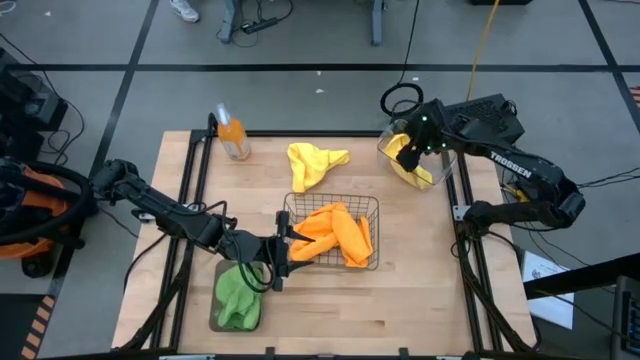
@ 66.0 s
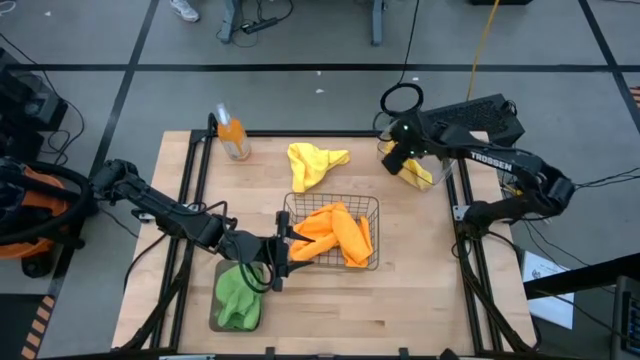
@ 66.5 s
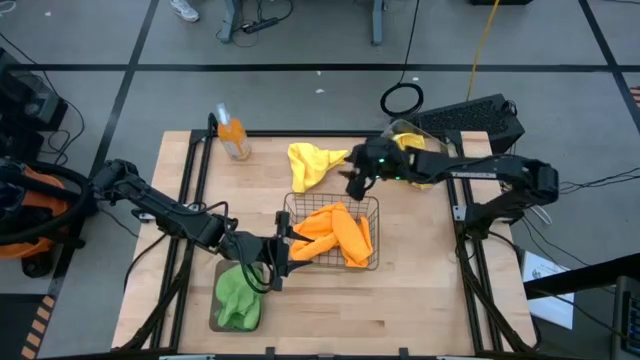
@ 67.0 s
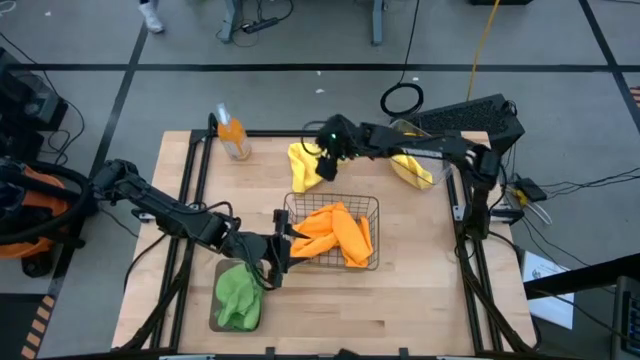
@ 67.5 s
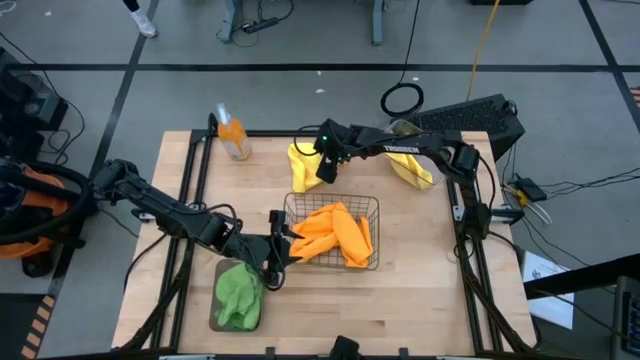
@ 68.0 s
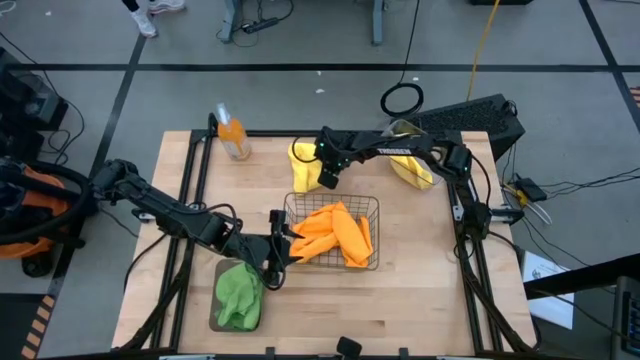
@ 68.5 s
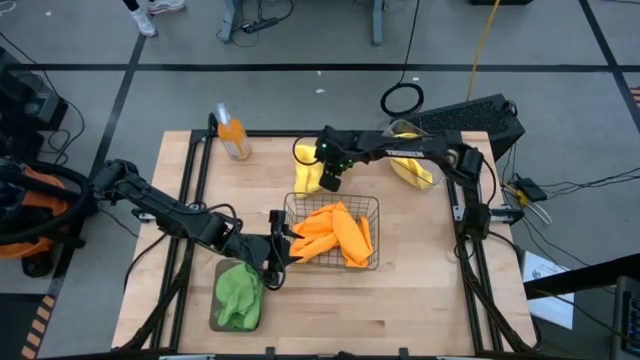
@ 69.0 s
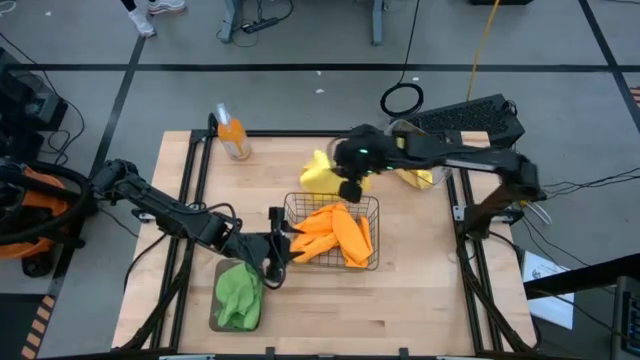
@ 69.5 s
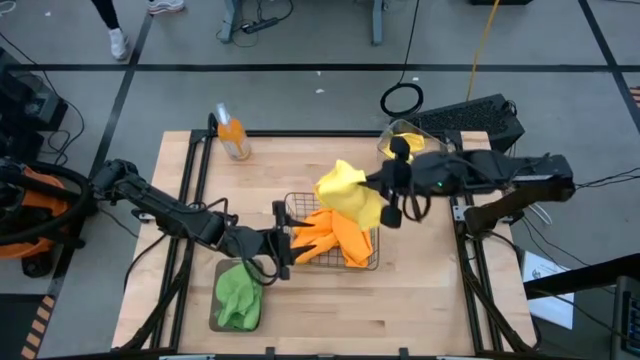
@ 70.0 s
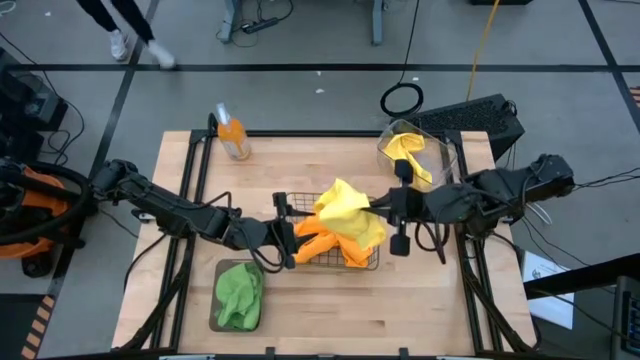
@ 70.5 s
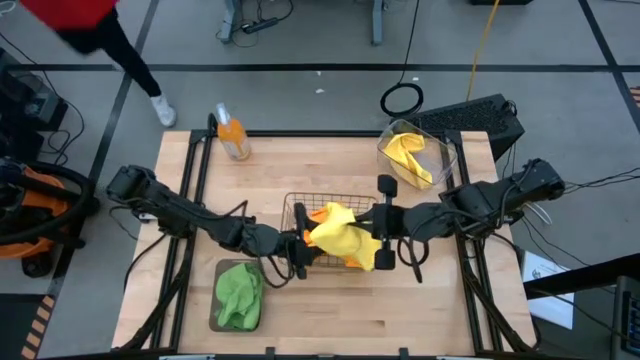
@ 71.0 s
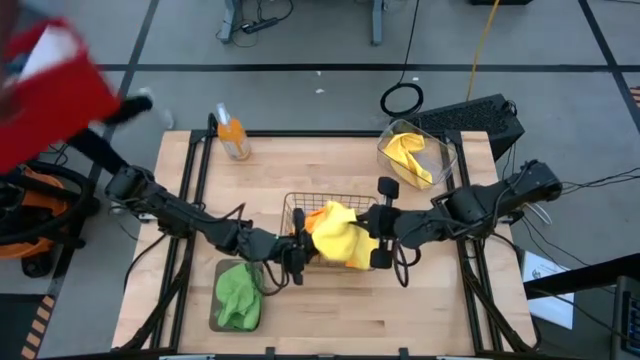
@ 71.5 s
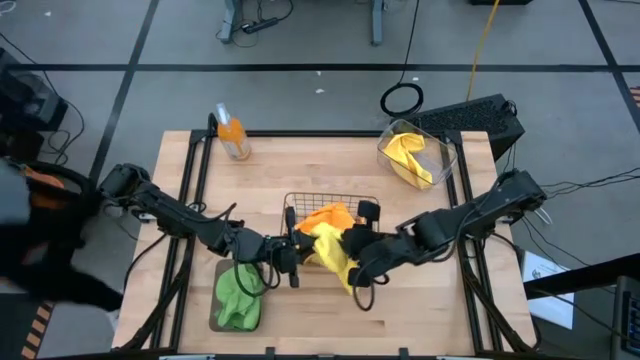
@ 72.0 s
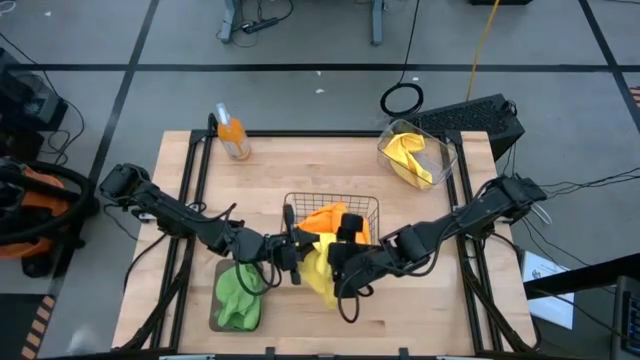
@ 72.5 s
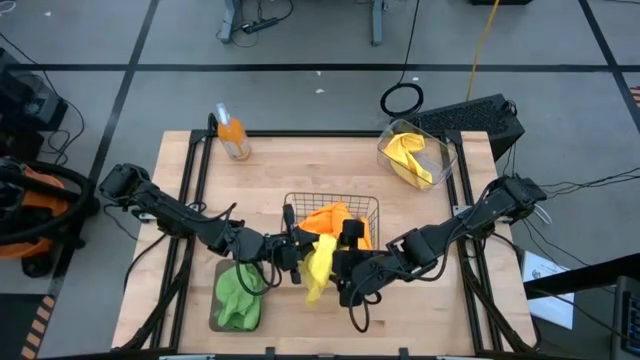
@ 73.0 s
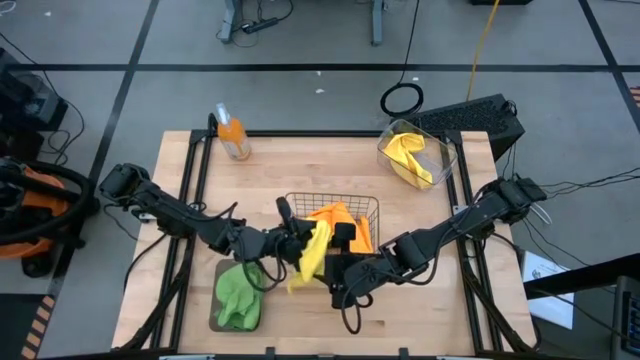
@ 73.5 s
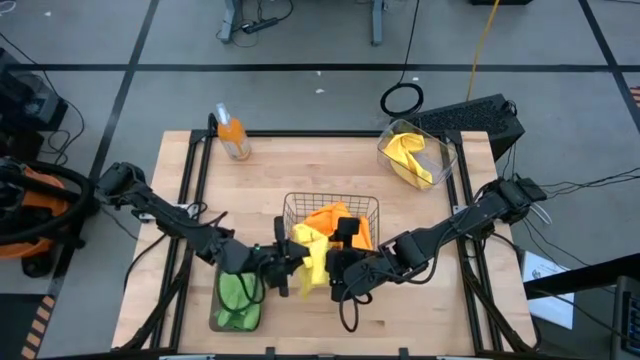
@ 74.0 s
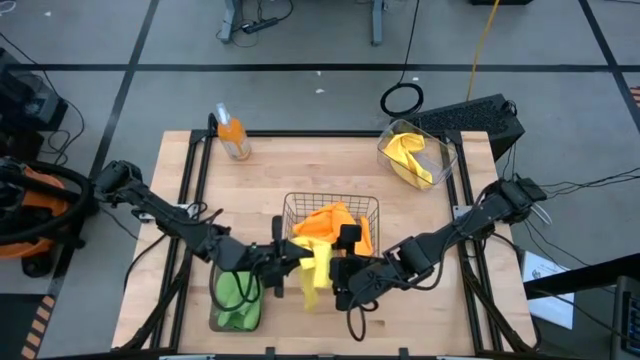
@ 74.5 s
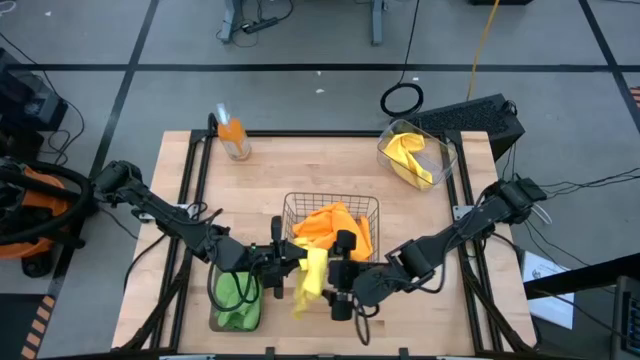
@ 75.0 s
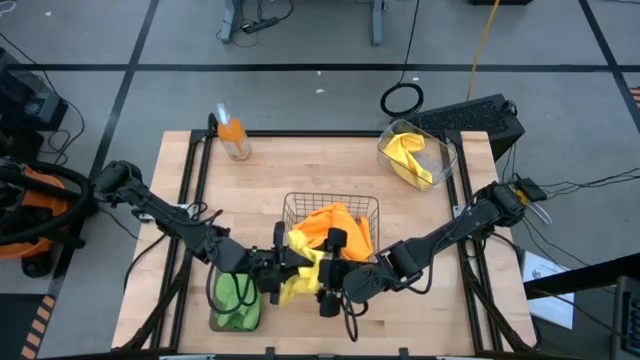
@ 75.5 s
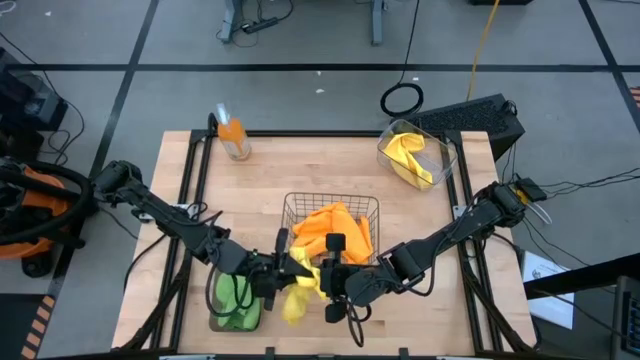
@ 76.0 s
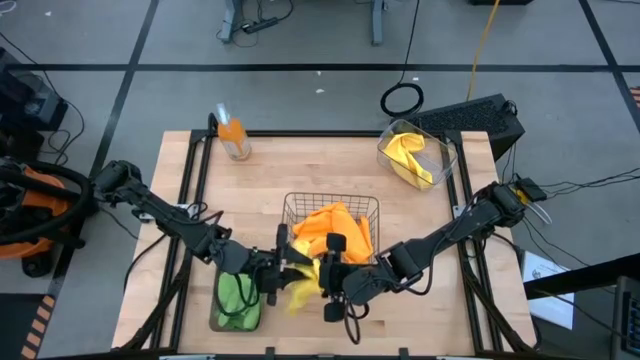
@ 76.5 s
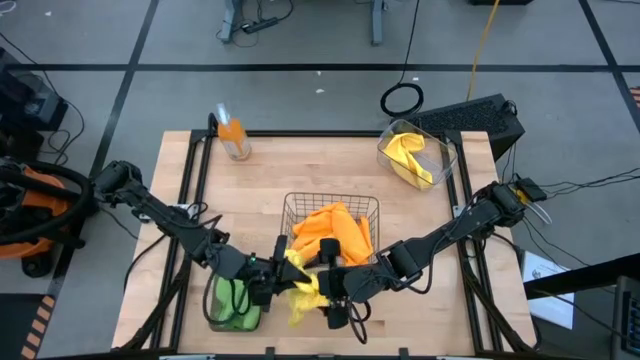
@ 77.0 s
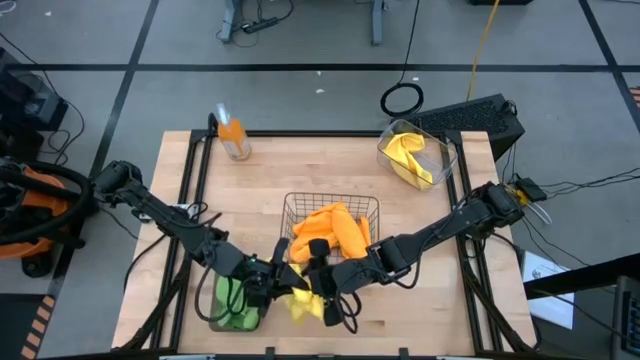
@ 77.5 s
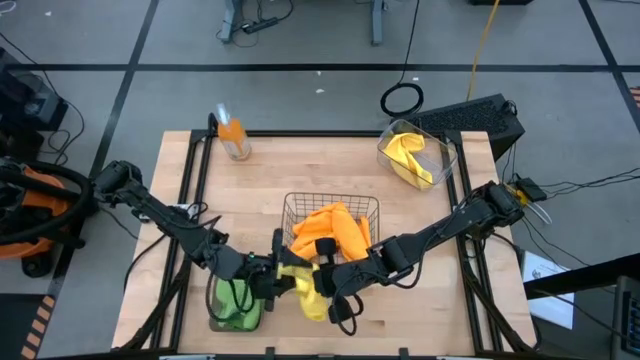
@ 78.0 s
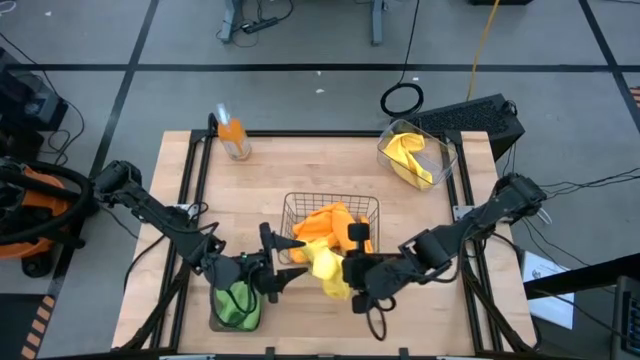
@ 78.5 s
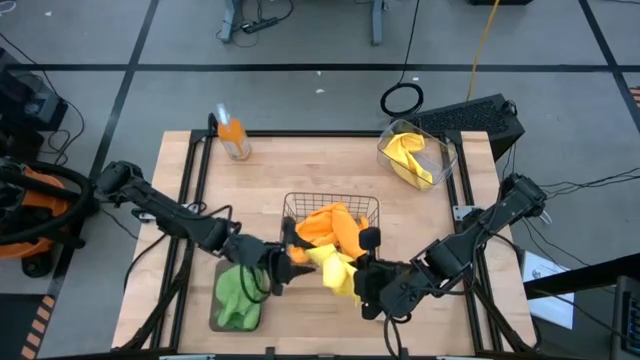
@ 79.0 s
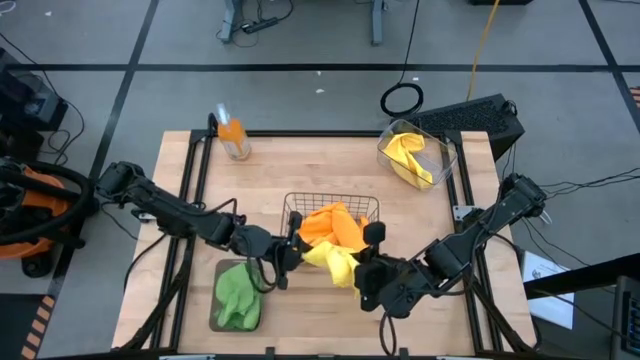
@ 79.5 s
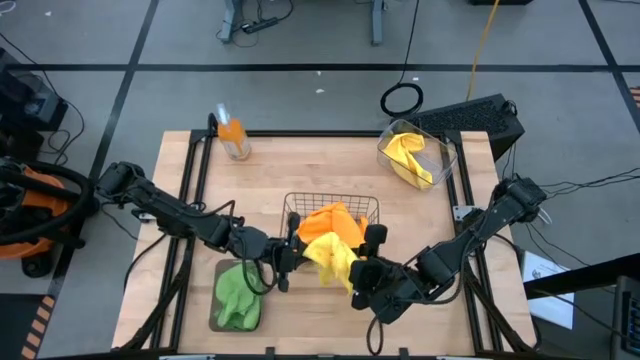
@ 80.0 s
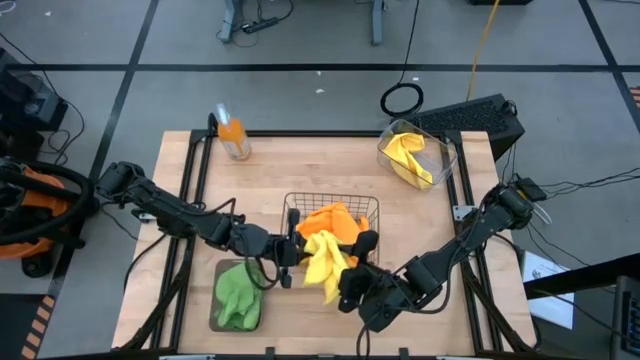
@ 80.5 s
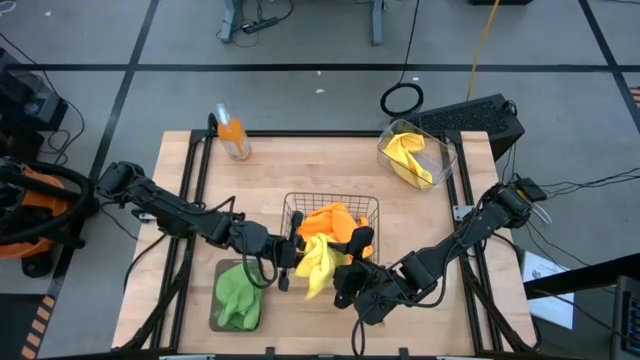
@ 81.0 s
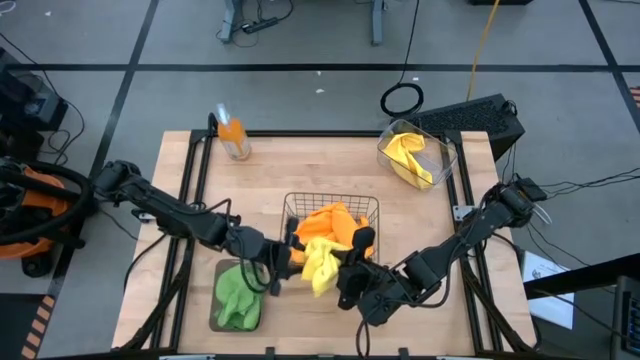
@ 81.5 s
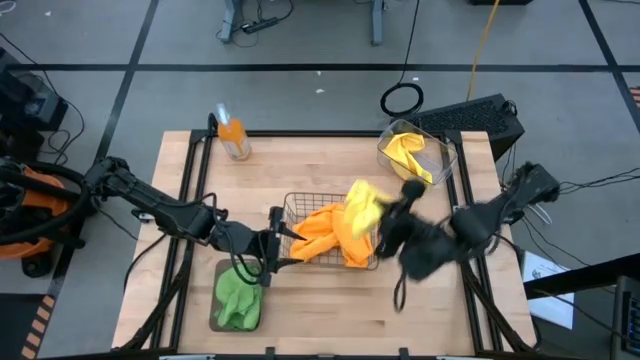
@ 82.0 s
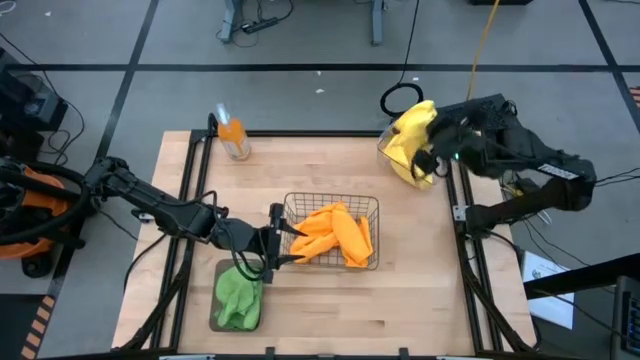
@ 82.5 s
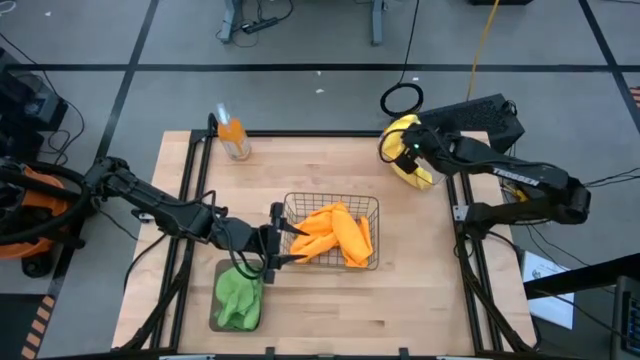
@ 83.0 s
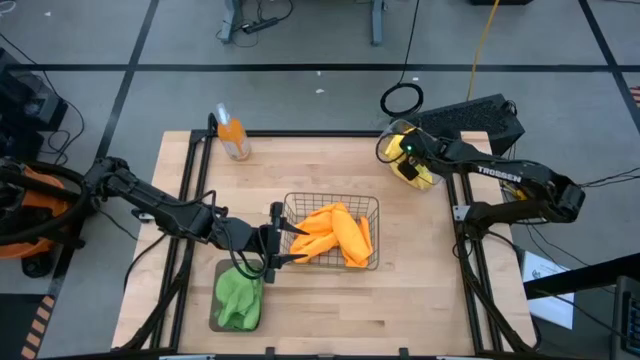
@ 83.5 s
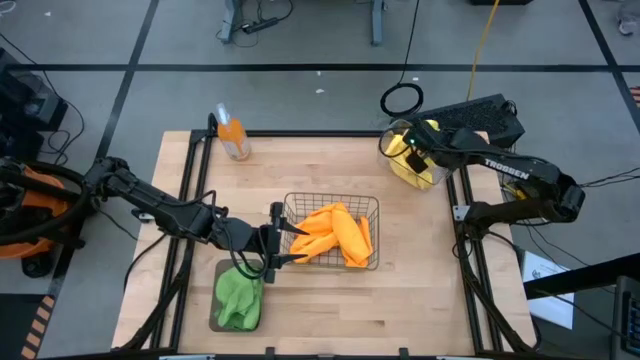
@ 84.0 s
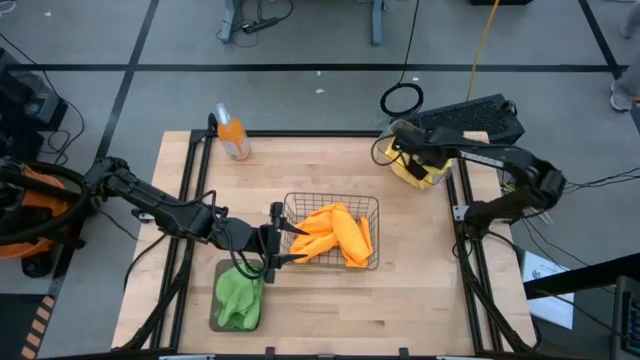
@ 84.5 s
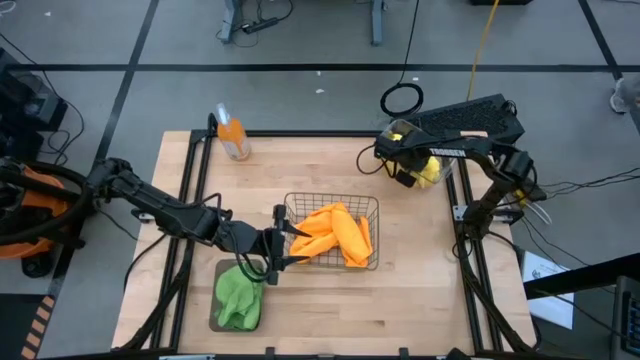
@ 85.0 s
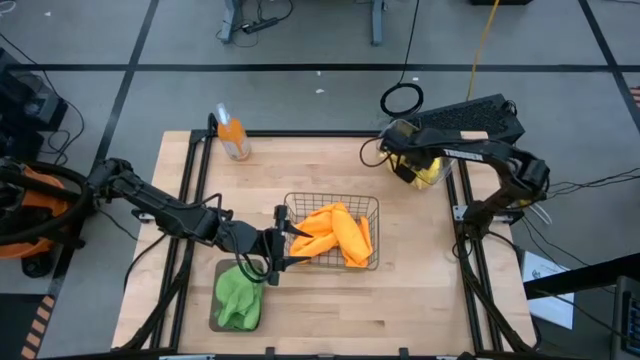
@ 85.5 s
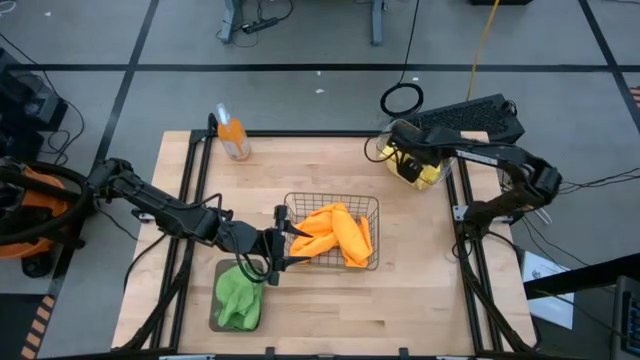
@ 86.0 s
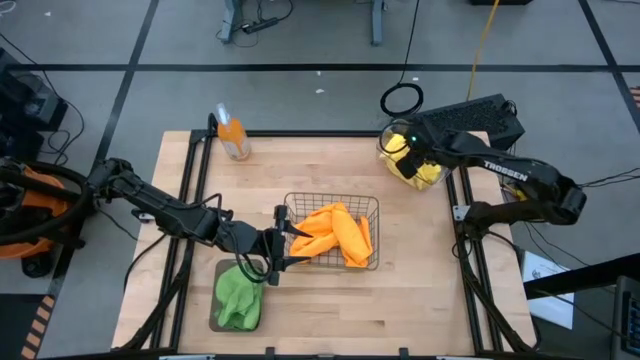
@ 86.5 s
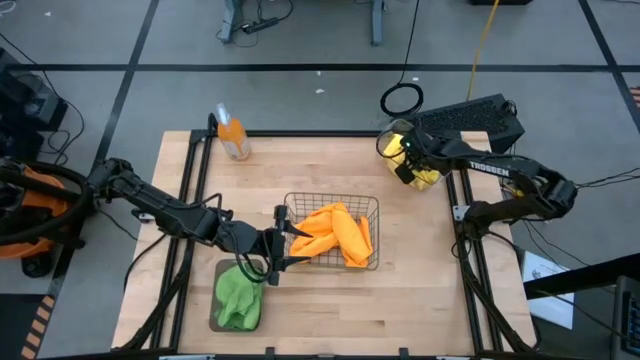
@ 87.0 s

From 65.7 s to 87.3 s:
Task: Sort microfiber towel by color & place in baskets
Put the yellow microfiber towel into the transparent bin

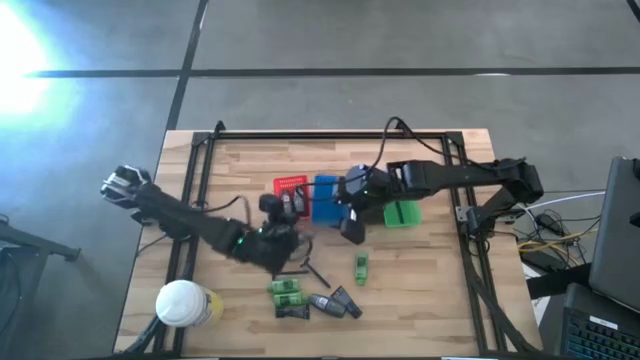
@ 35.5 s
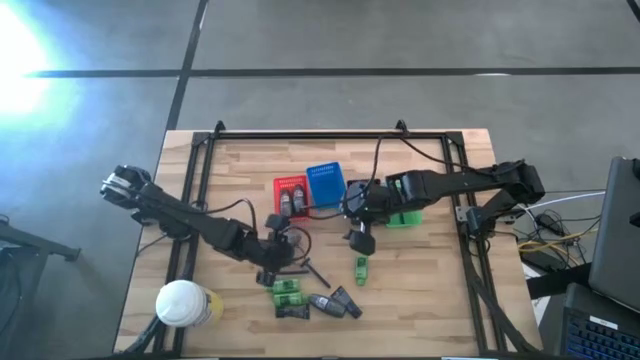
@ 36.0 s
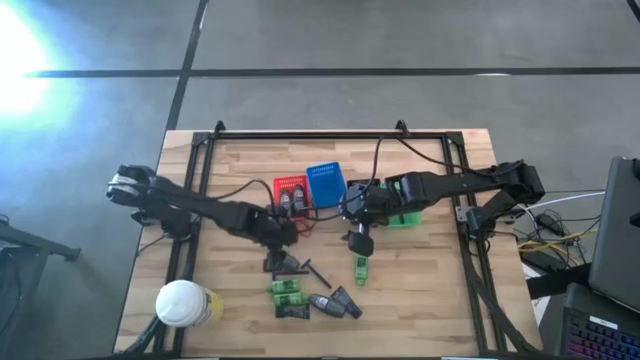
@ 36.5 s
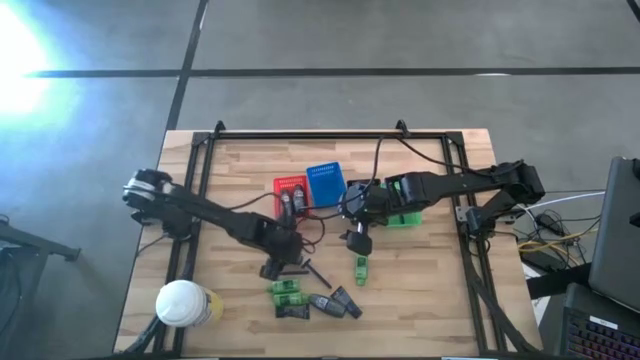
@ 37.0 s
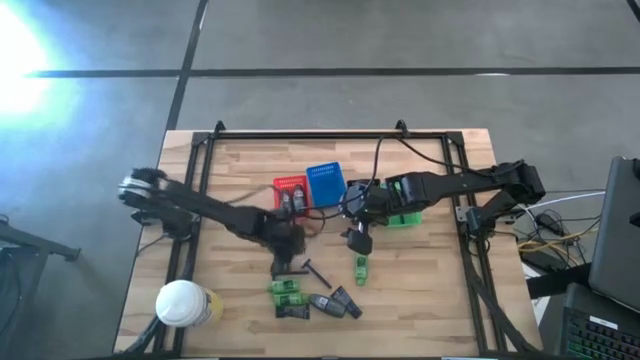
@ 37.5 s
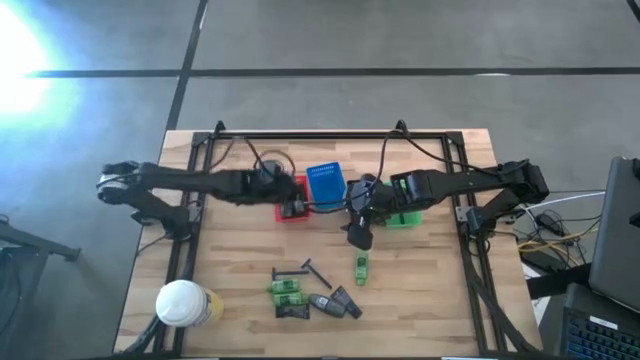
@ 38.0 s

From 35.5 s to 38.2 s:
Task: Pick & Place Travel size toiletries
Put the gray deodorant into the red bin
